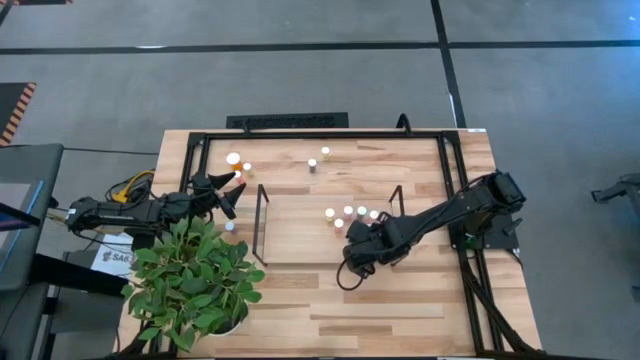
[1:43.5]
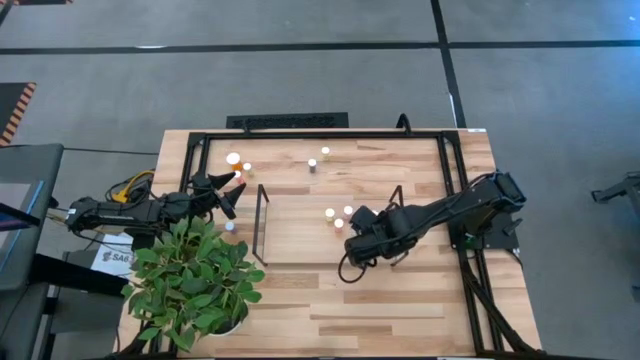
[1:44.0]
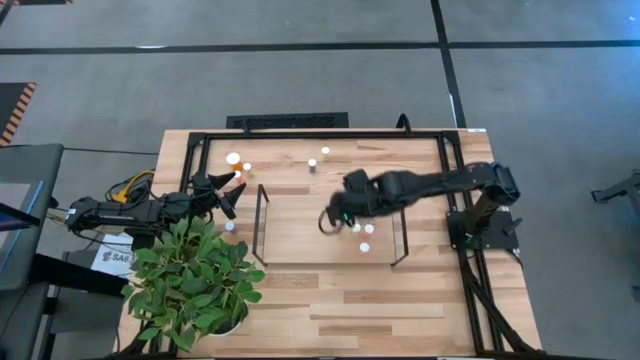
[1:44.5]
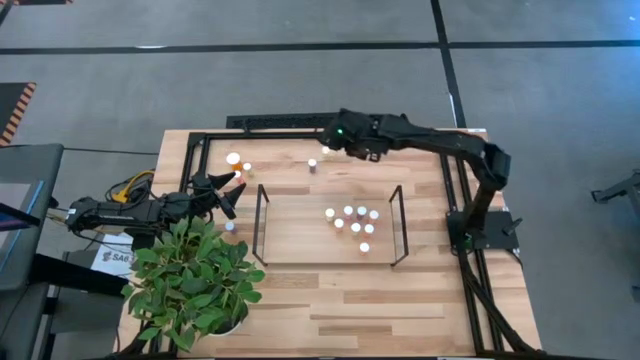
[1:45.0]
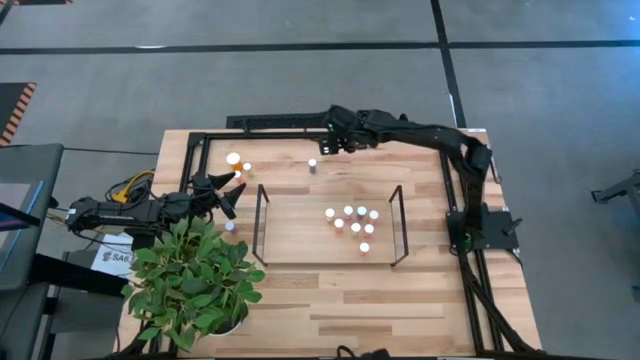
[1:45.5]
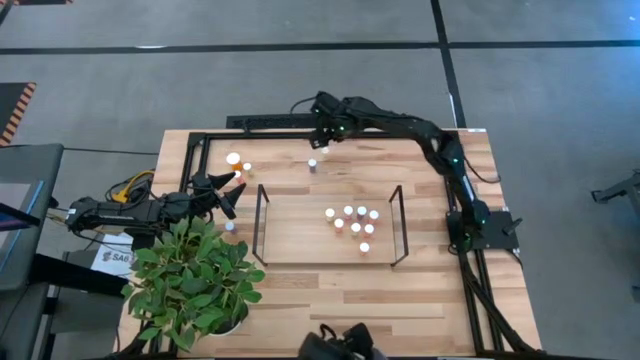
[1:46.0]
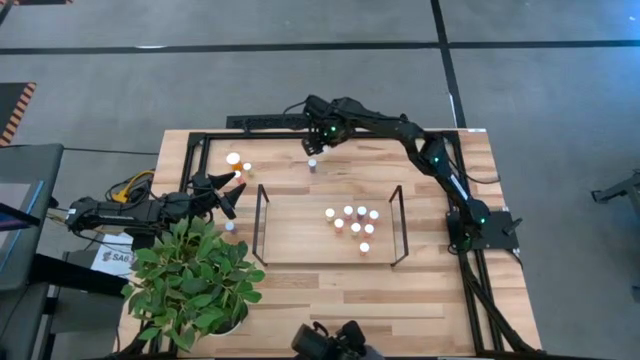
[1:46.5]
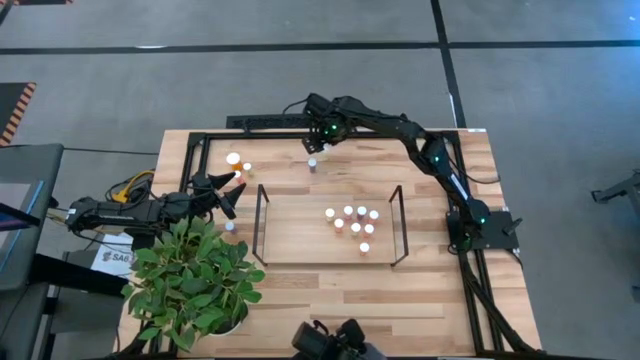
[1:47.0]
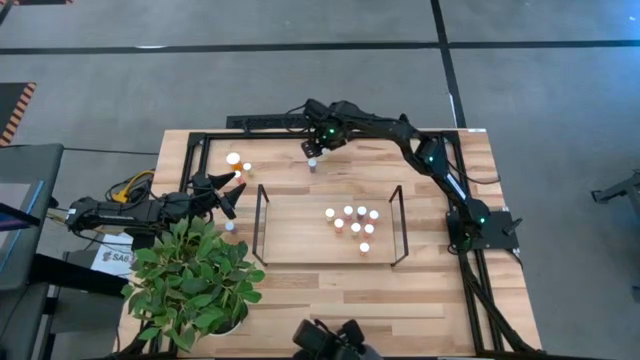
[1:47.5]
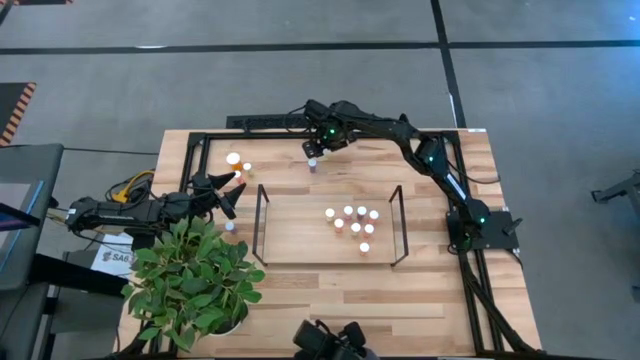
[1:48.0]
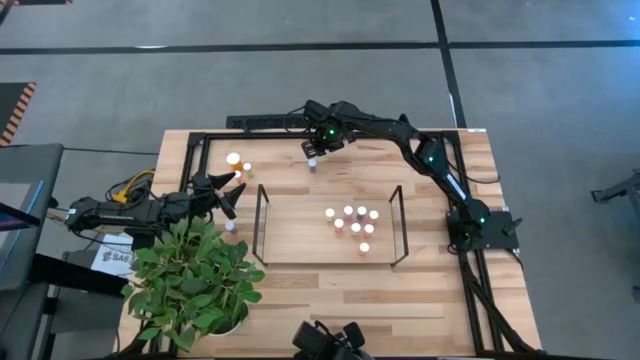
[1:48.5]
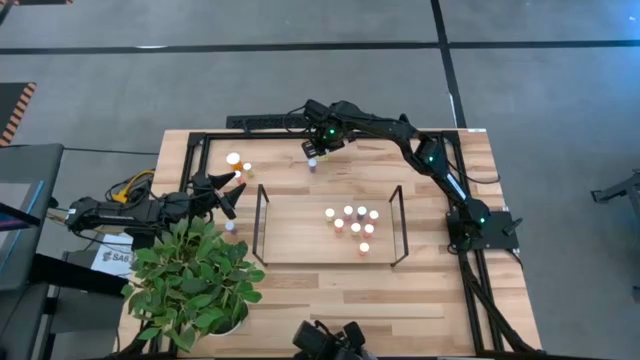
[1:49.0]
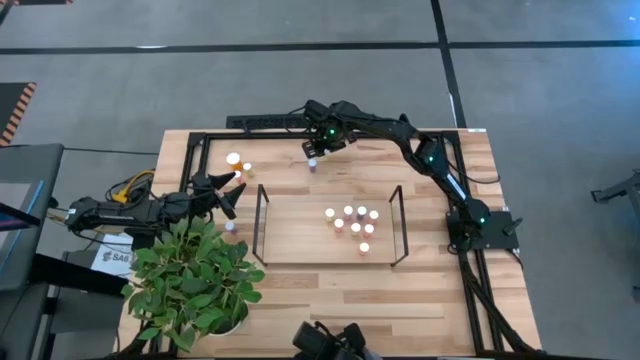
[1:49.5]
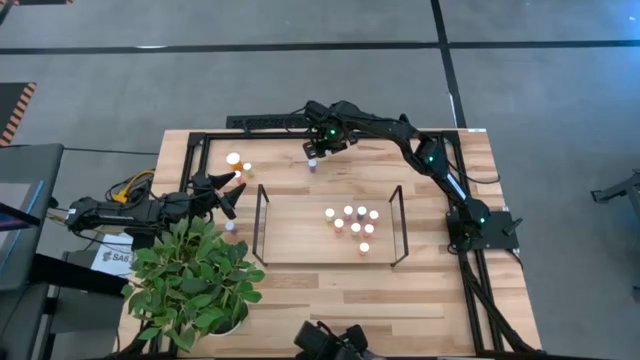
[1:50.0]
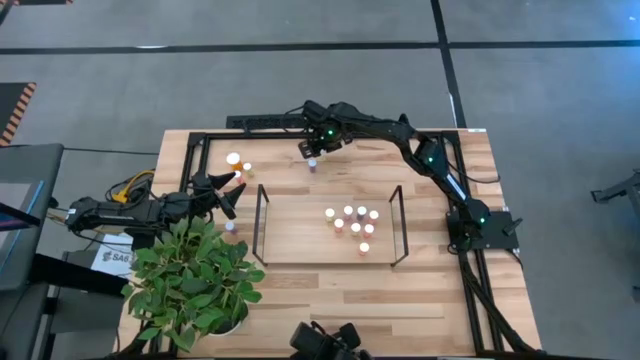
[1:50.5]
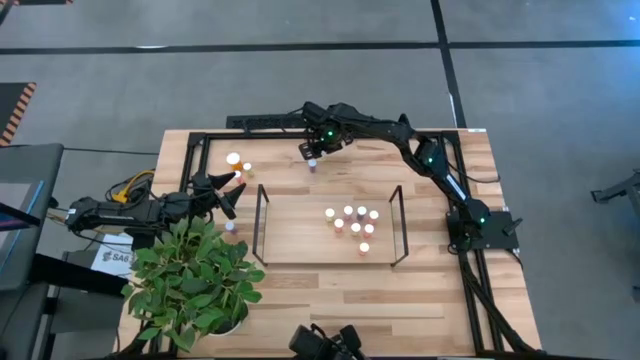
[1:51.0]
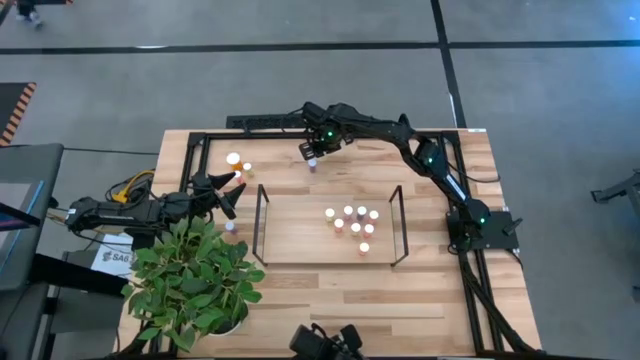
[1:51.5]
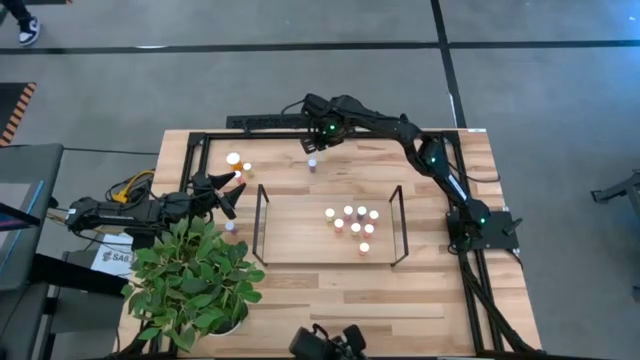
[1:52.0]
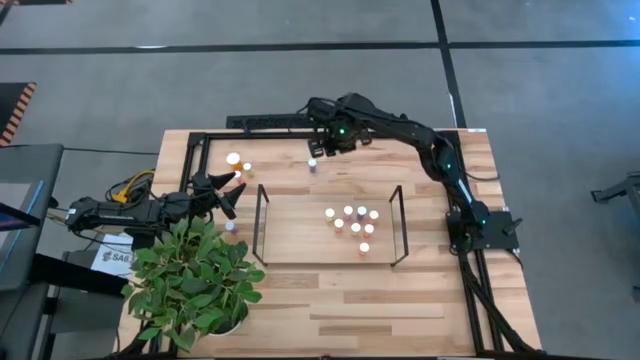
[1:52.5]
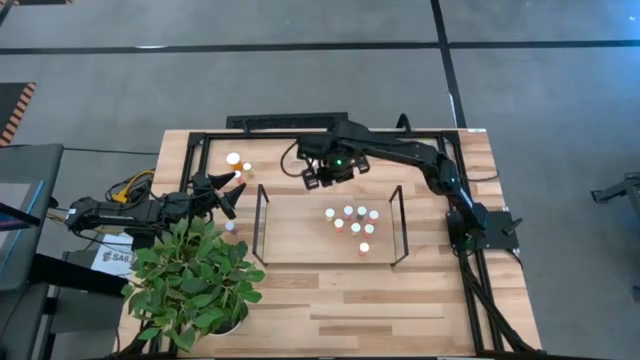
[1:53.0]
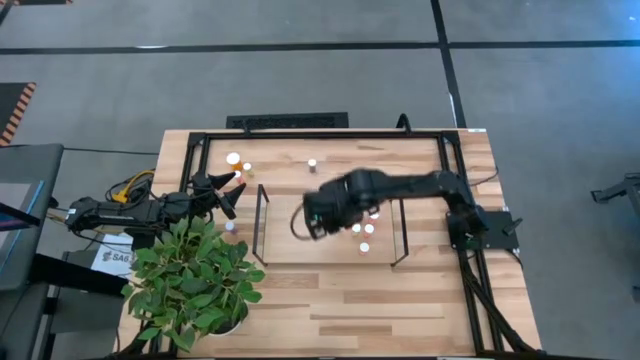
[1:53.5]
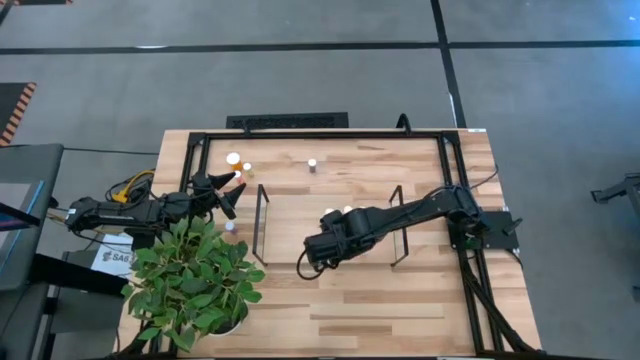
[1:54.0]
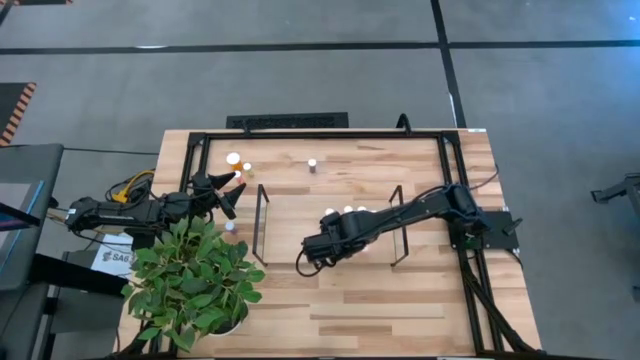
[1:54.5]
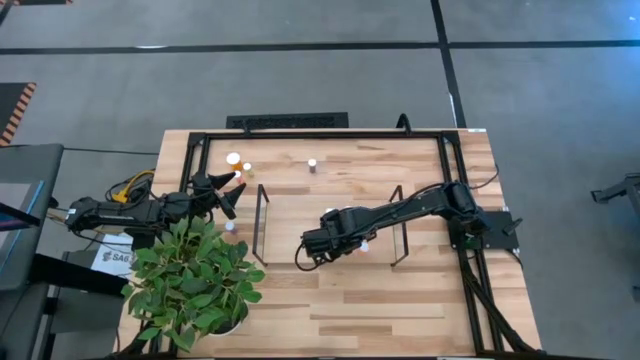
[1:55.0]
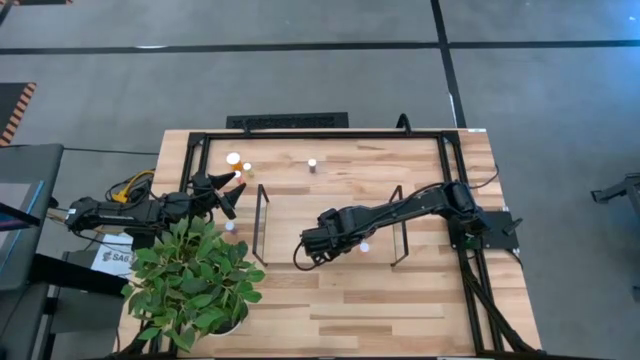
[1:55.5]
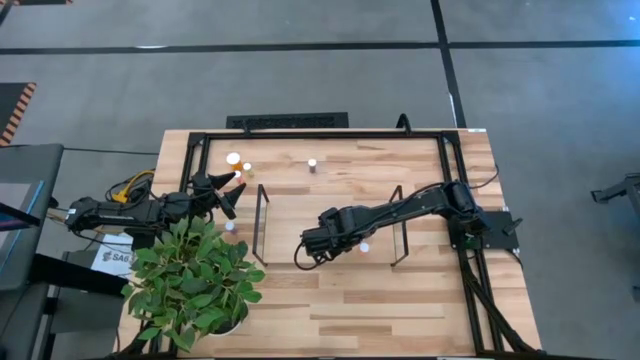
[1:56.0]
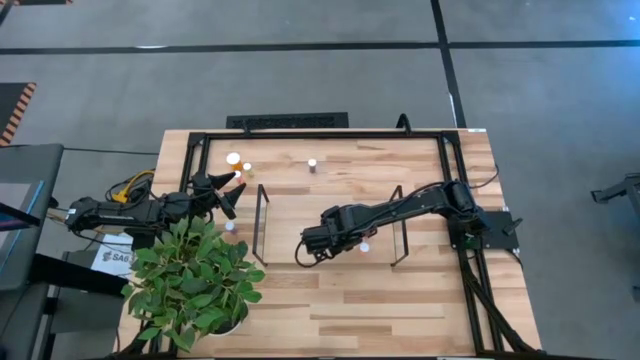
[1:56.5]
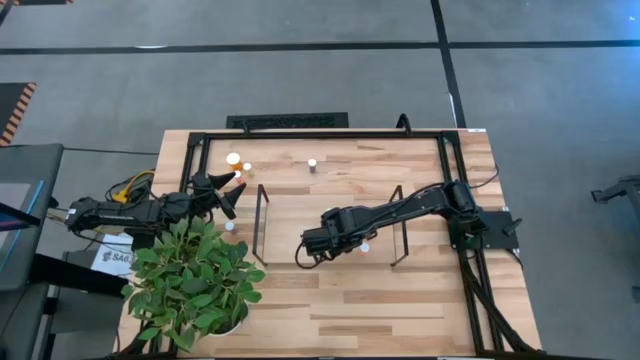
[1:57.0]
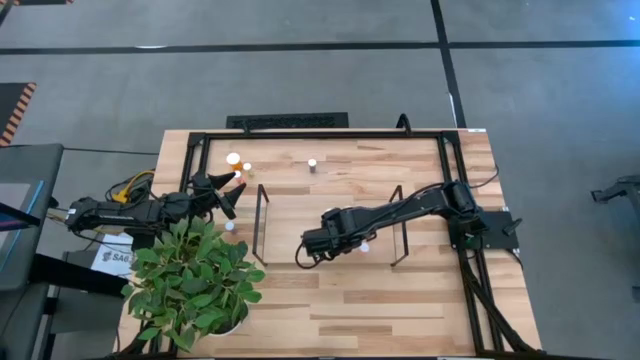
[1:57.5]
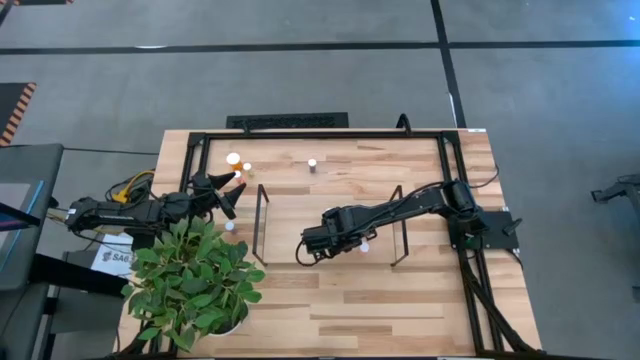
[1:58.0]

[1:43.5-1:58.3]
Task: Pick and place medicine bottles onto shelf by color
Put the yellow pill bottle on the shelf

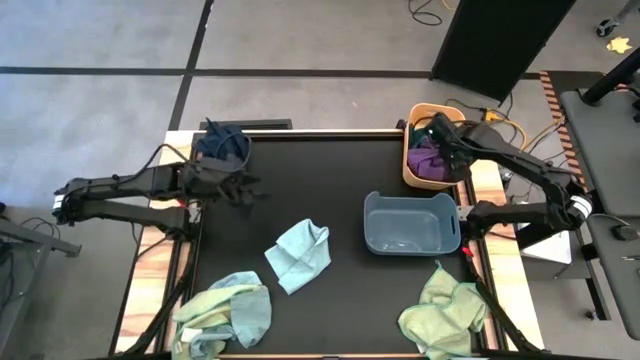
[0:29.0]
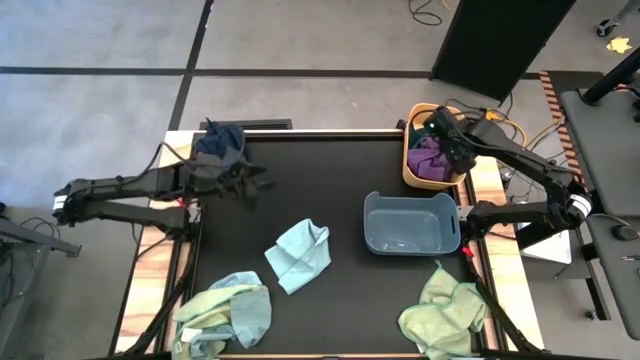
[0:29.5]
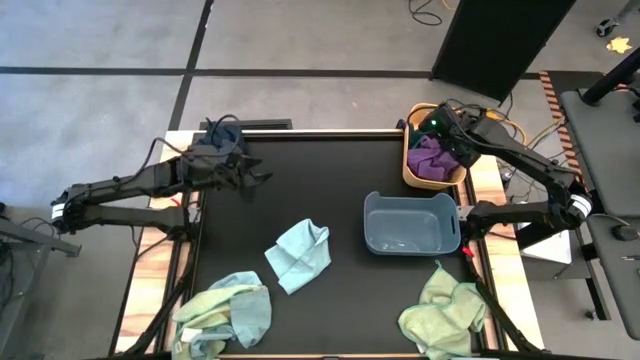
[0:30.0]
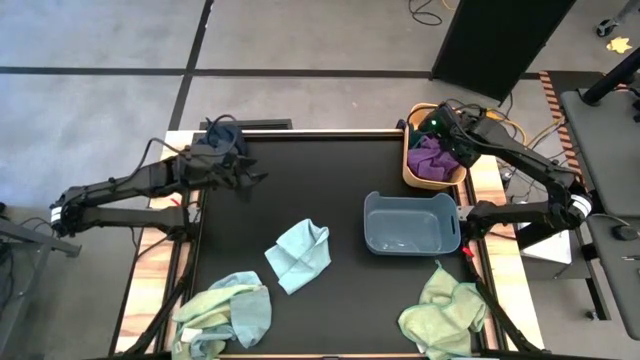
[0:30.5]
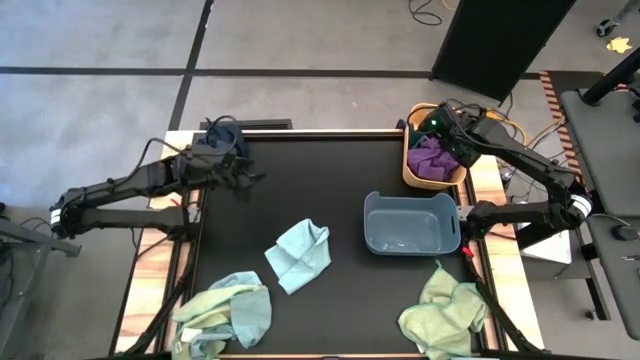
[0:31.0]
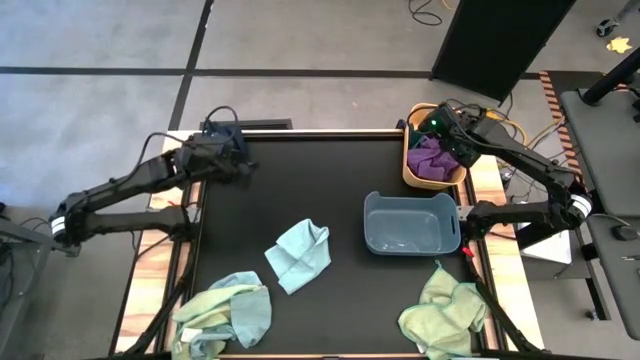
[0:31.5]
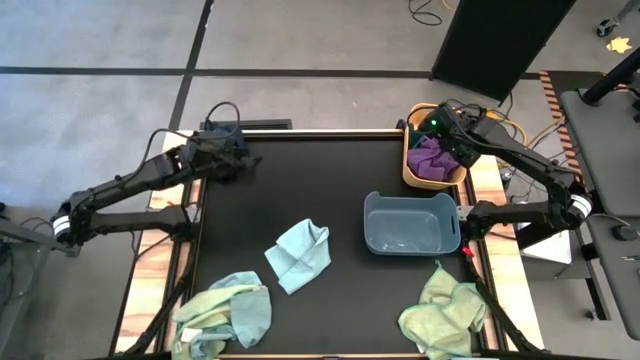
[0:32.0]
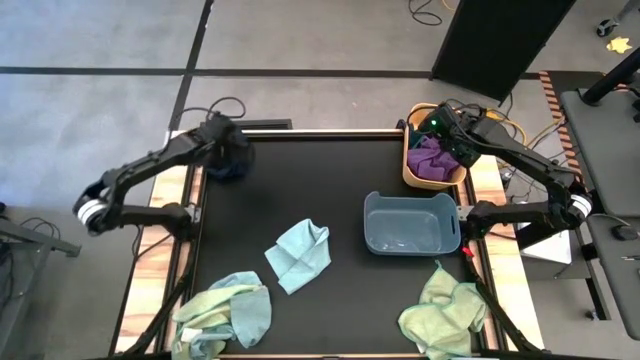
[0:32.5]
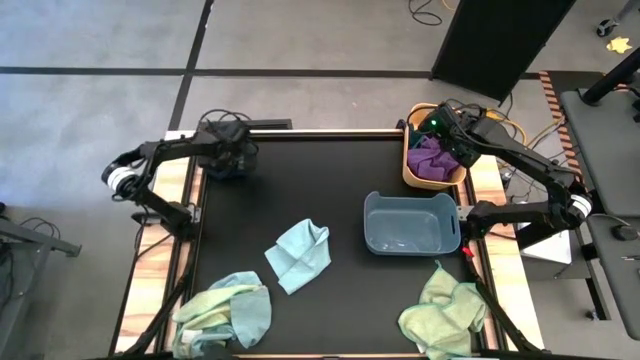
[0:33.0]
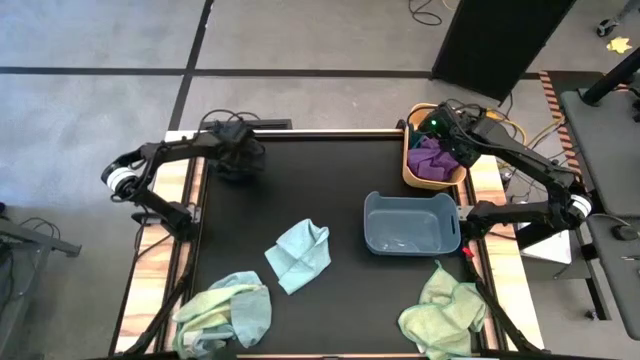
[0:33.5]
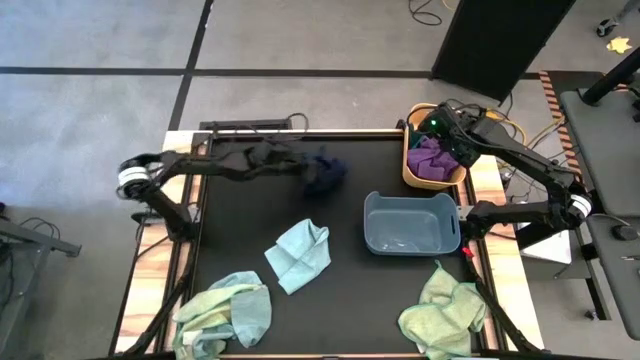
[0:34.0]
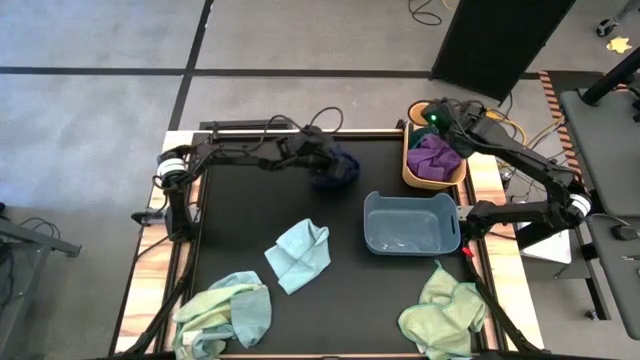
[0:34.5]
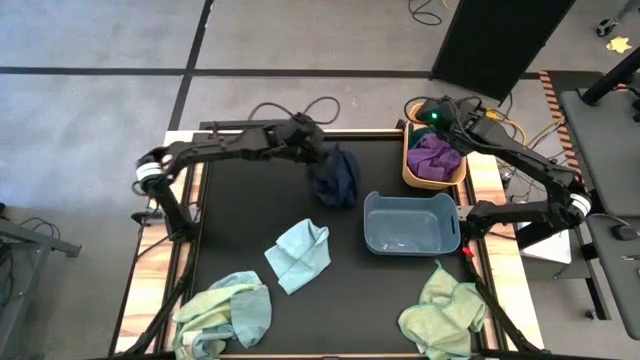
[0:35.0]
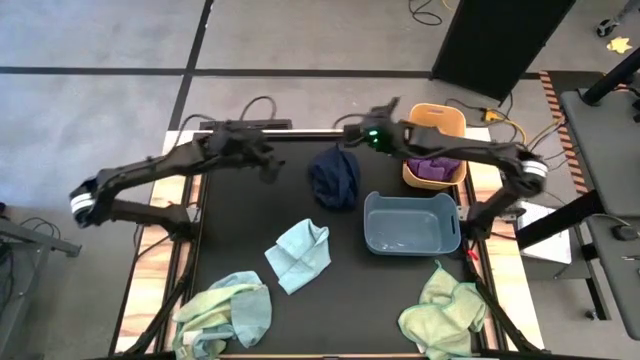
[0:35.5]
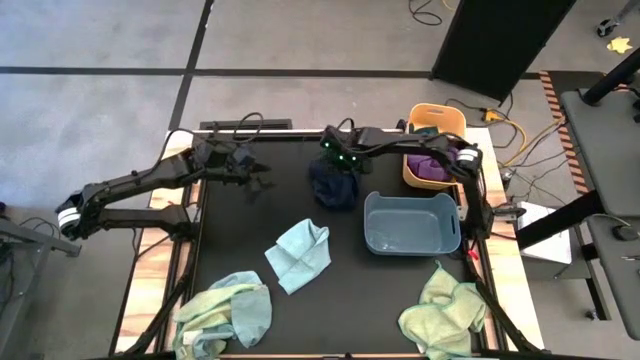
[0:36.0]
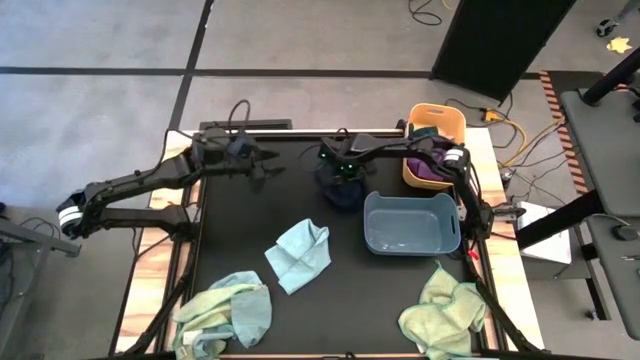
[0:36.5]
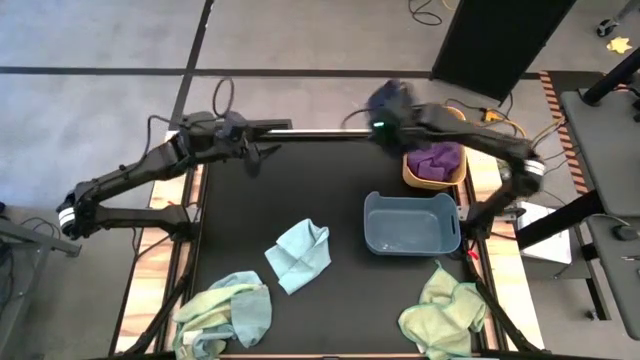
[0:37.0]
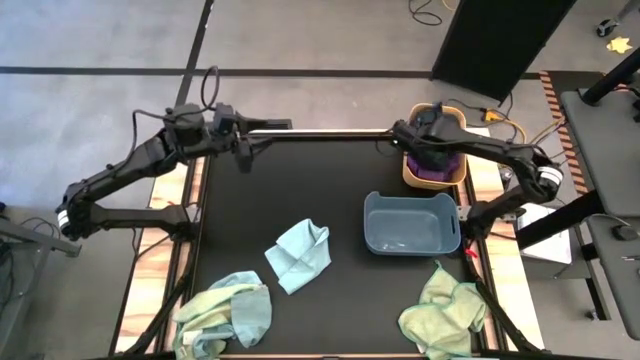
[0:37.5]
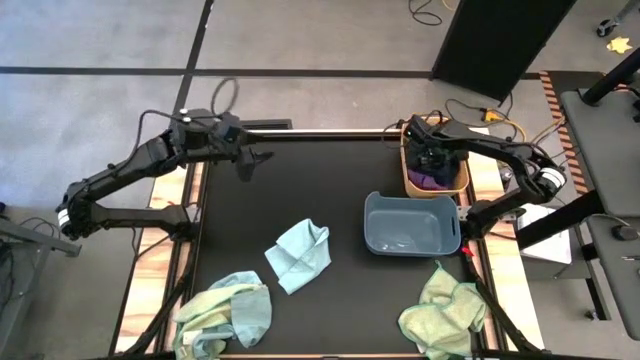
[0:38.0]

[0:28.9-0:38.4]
Task: Sort towels by color in basket
Put the blue towel into the yellow bin
